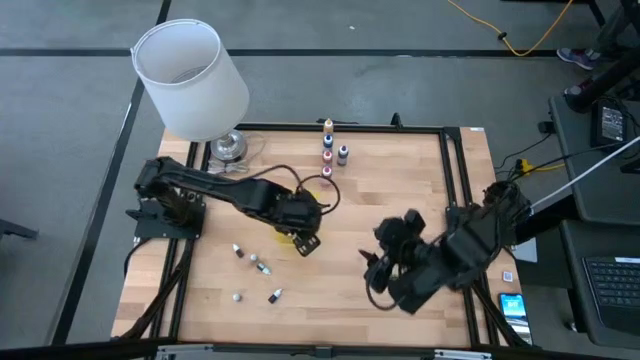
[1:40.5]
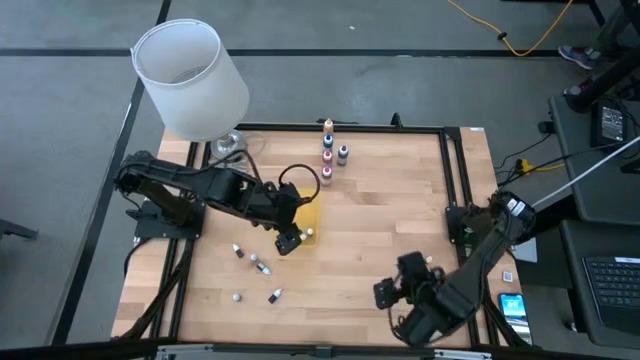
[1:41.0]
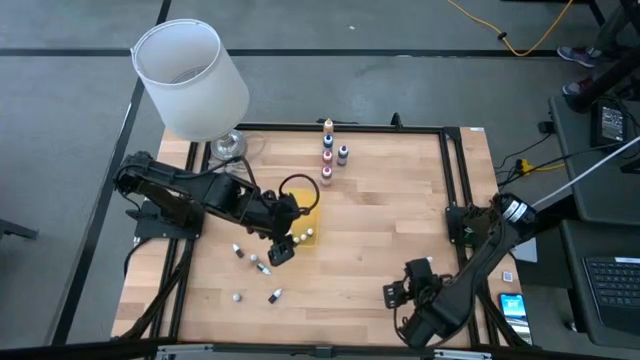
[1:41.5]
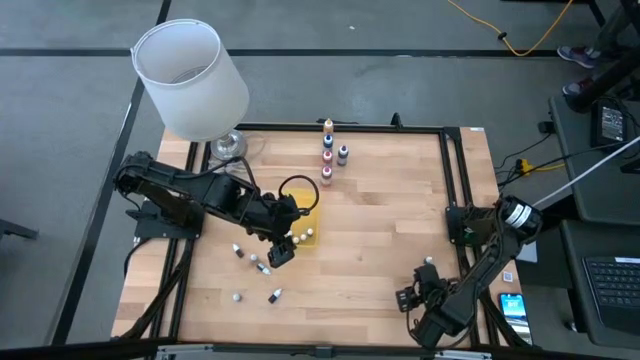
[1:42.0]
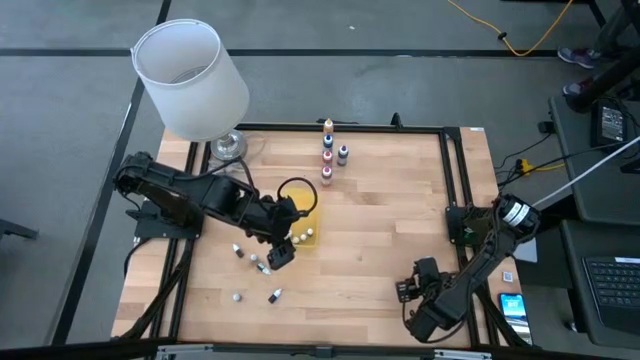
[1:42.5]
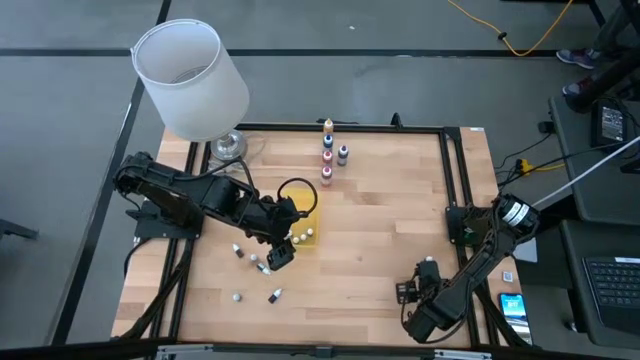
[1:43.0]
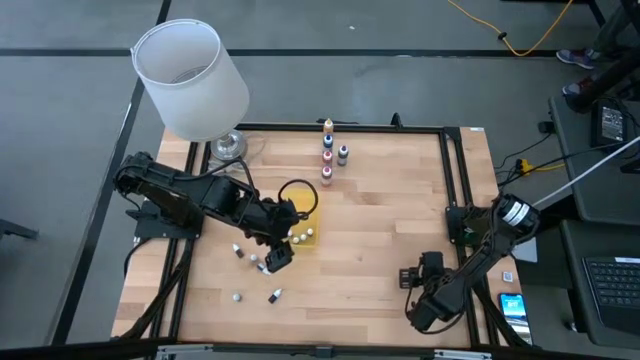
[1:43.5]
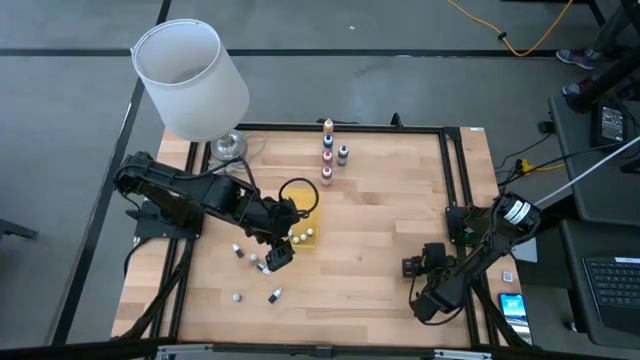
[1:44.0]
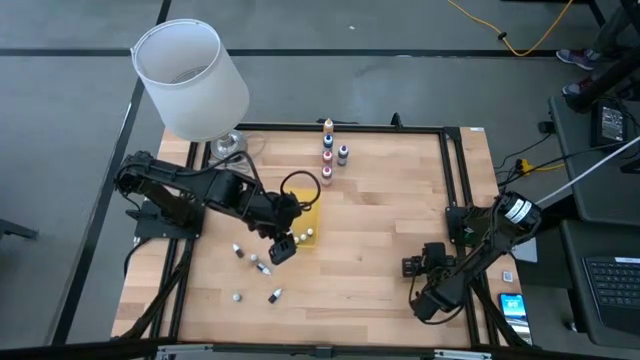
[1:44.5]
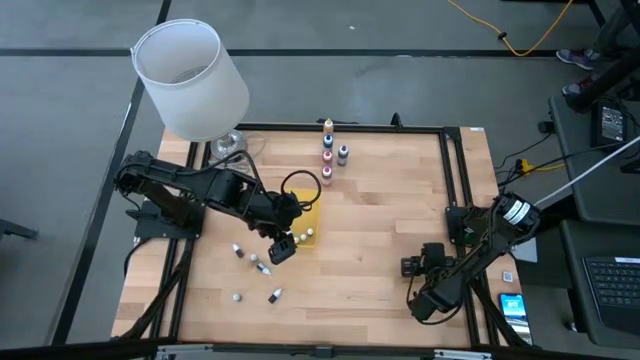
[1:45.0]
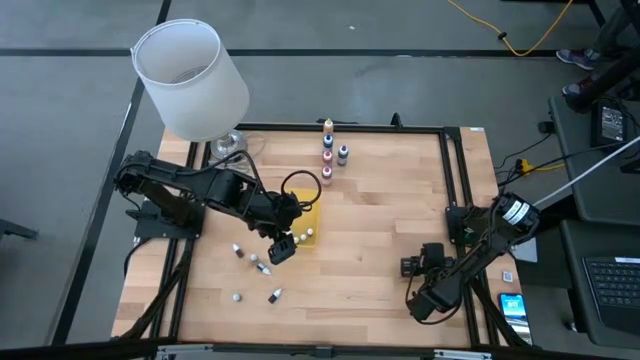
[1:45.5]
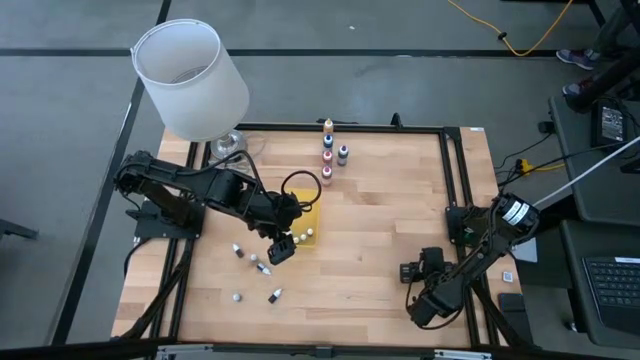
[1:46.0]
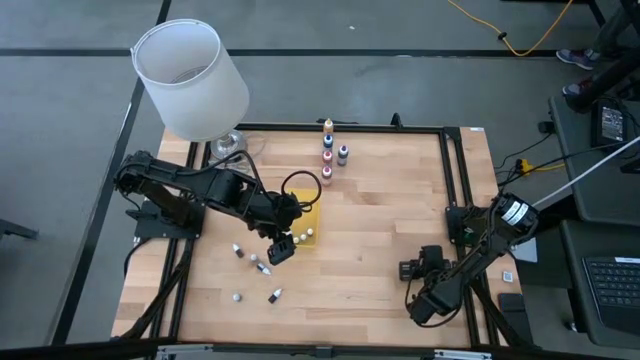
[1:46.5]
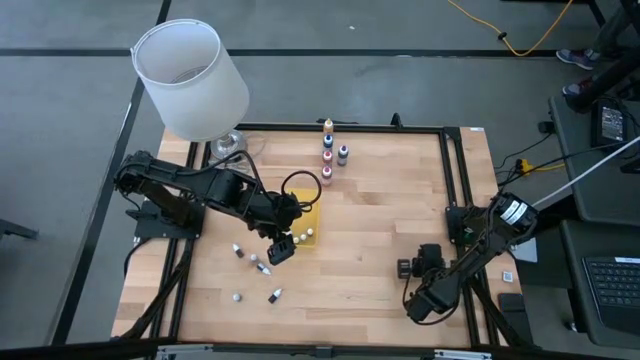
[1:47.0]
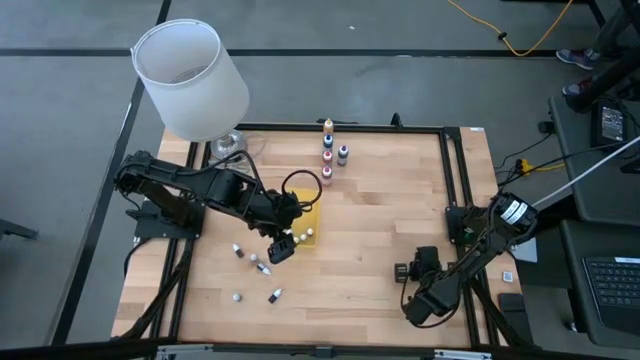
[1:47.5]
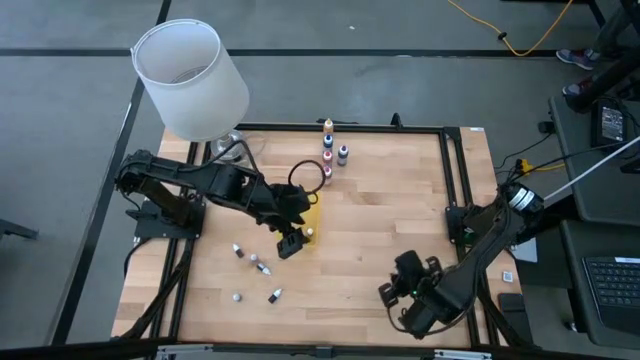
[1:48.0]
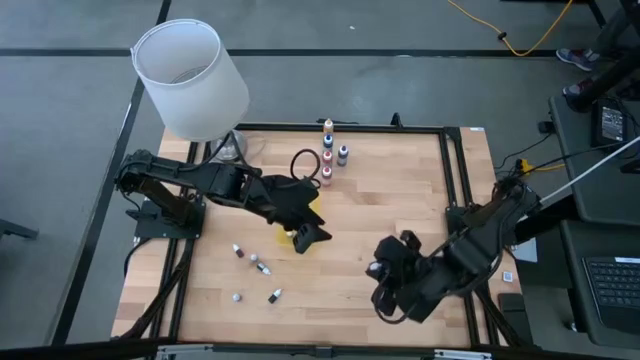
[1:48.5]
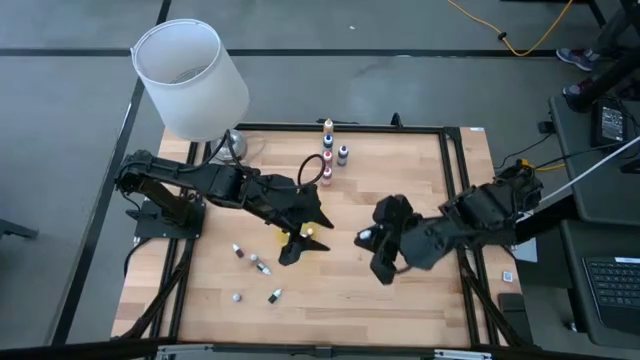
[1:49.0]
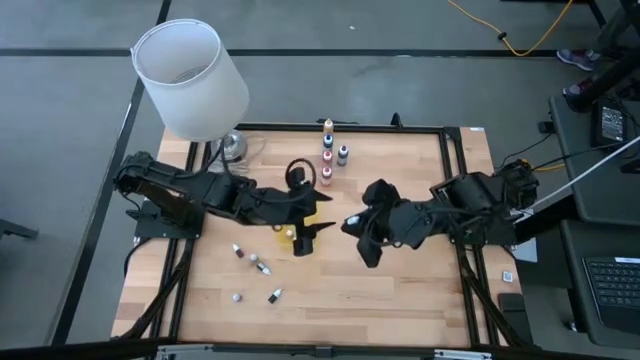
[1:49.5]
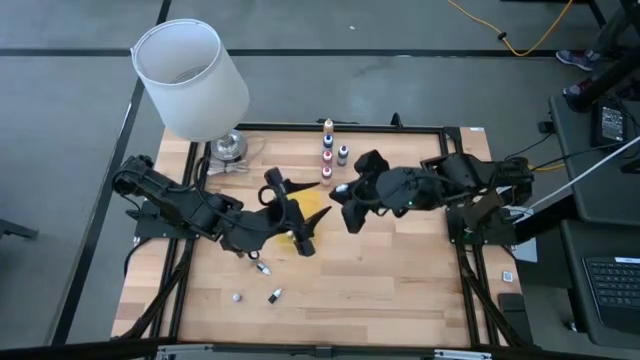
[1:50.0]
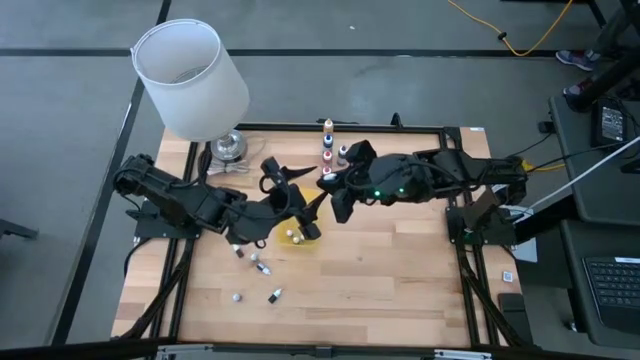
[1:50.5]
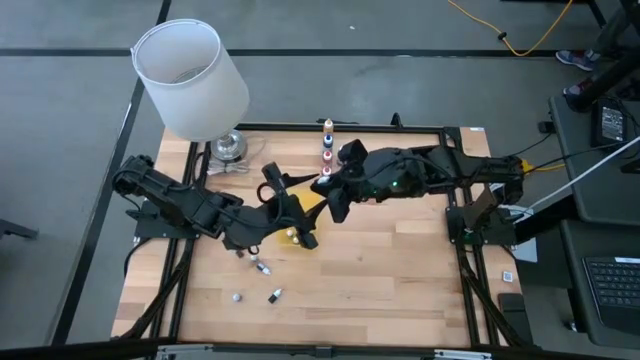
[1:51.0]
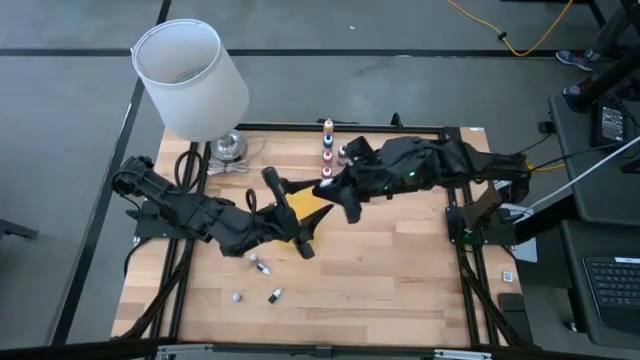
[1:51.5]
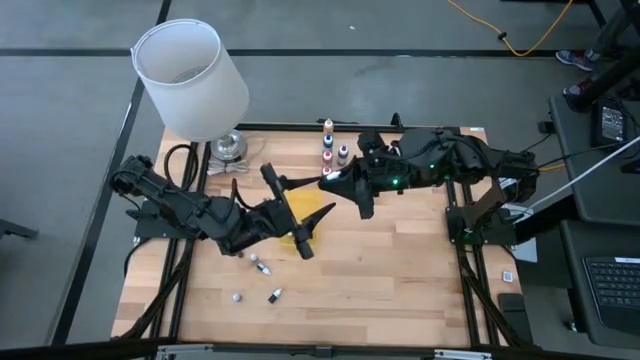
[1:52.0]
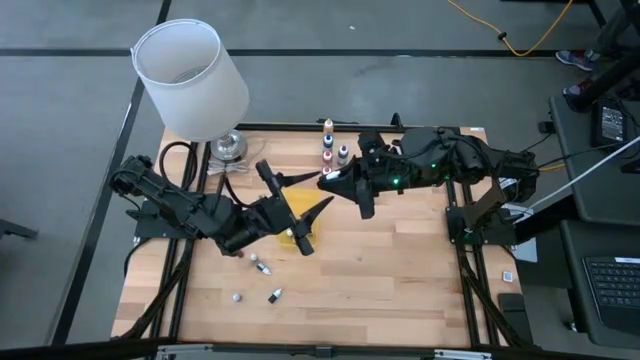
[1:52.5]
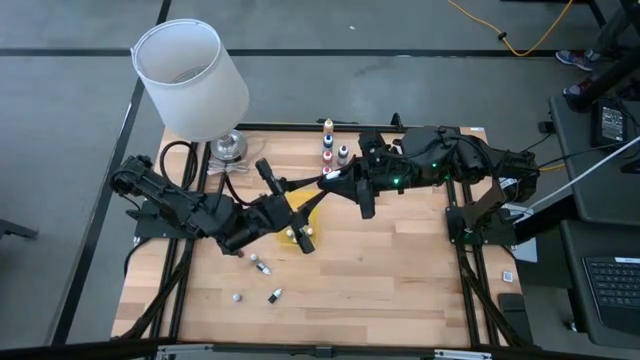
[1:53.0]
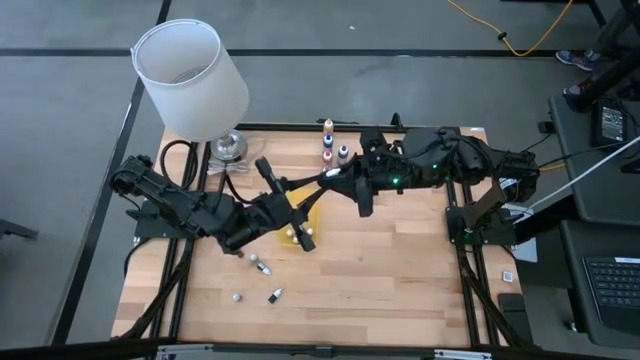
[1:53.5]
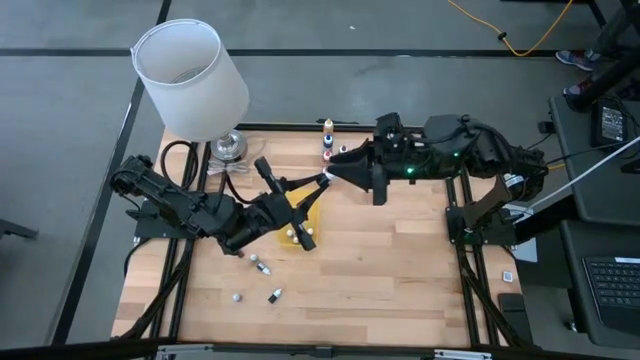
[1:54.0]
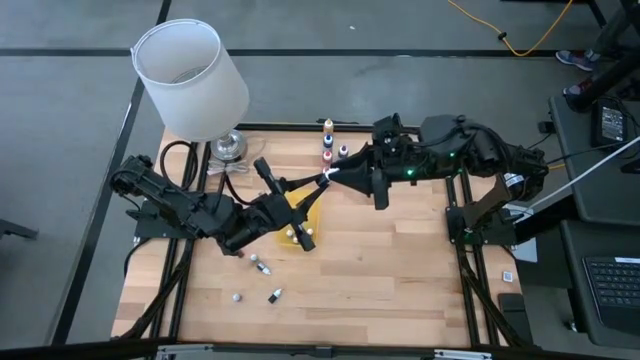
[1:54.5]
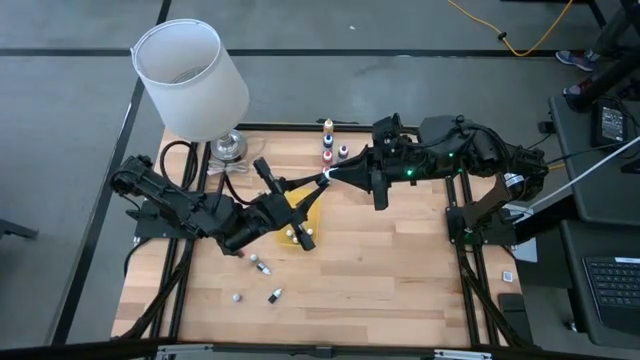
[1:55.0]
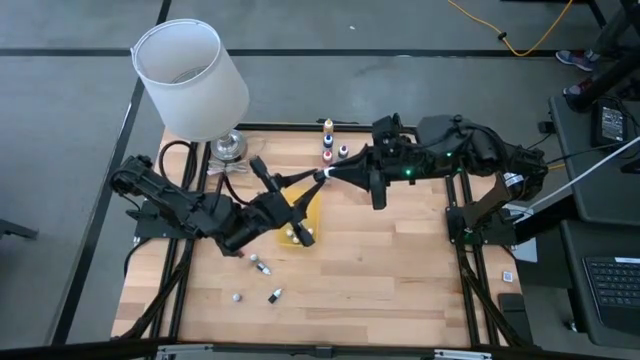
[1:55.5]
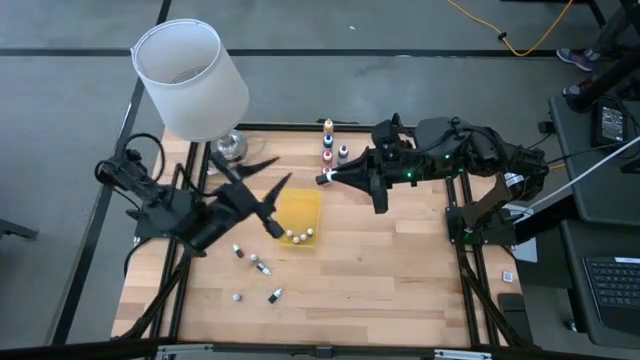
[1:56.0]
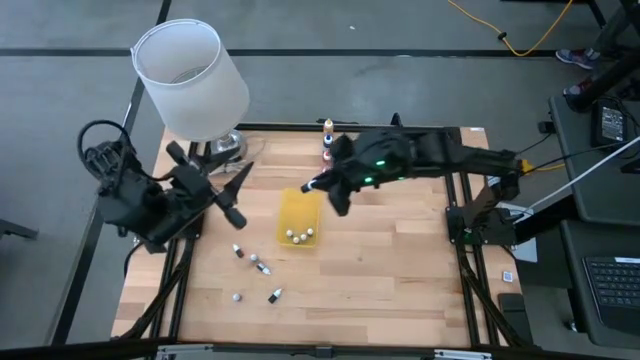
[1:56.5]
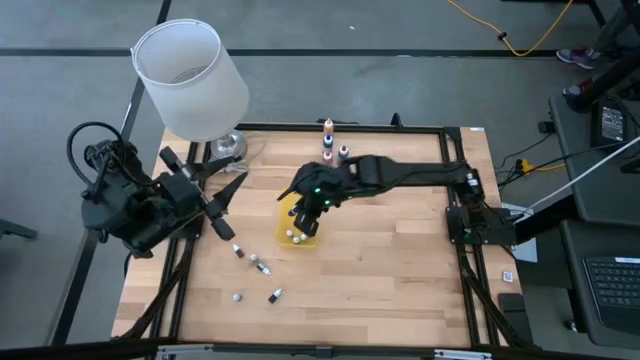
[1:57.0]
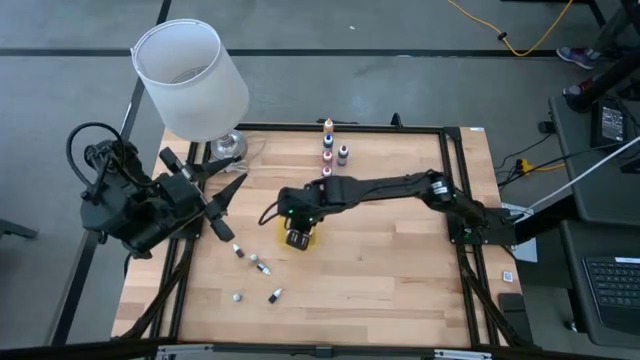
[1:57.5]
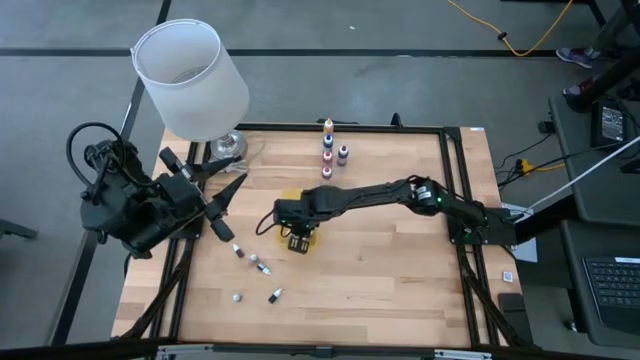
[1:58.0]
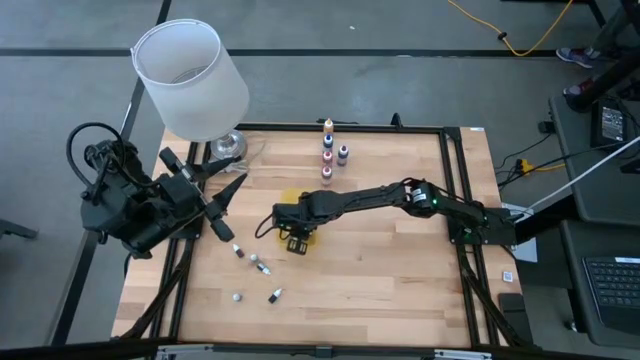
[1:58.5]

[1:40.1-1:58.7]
Task: Pick & Place food coloring
Put the small red bottle into the yellow bin
